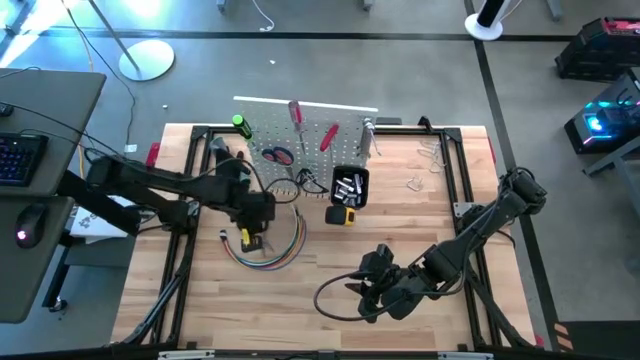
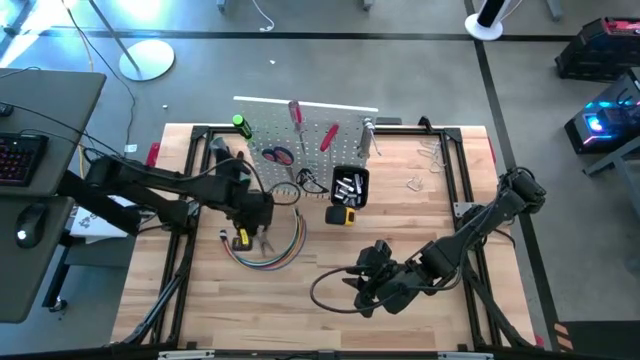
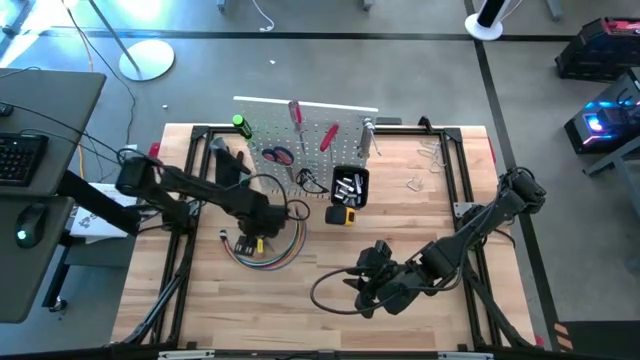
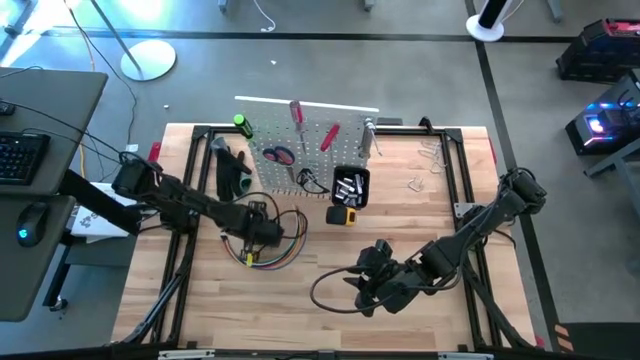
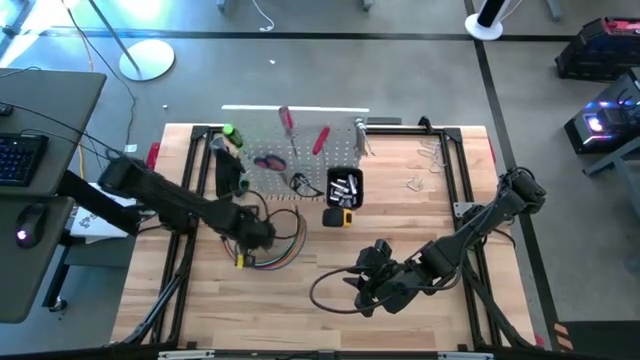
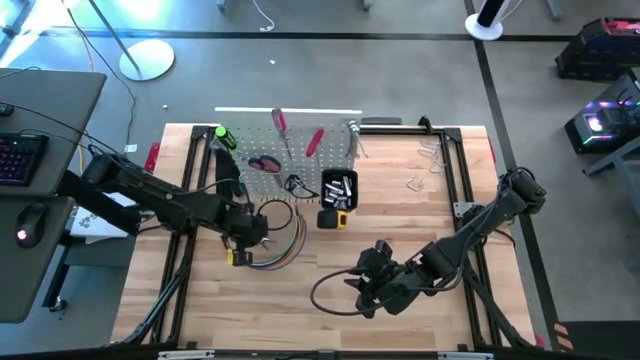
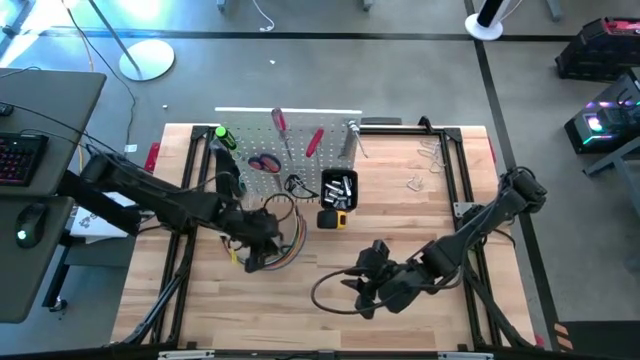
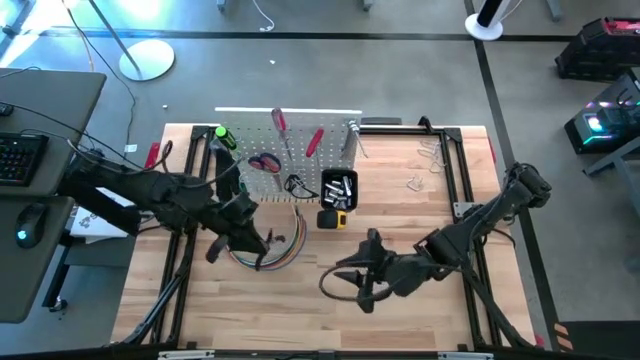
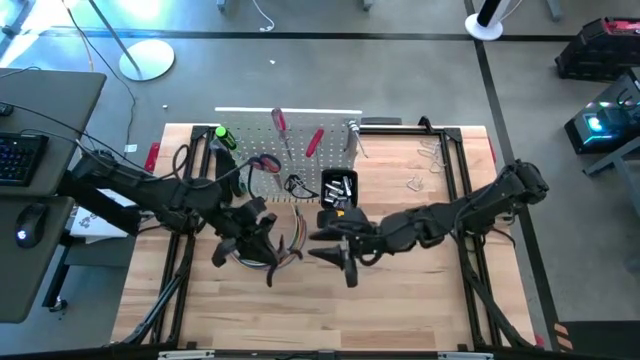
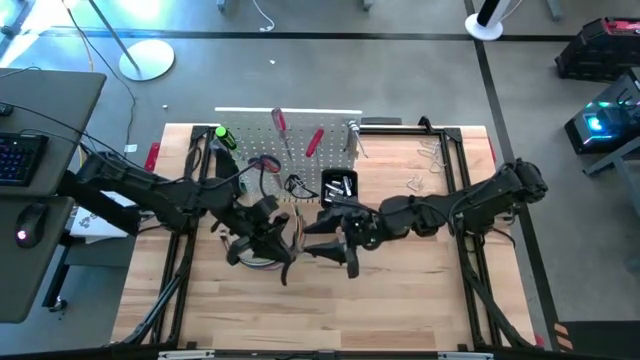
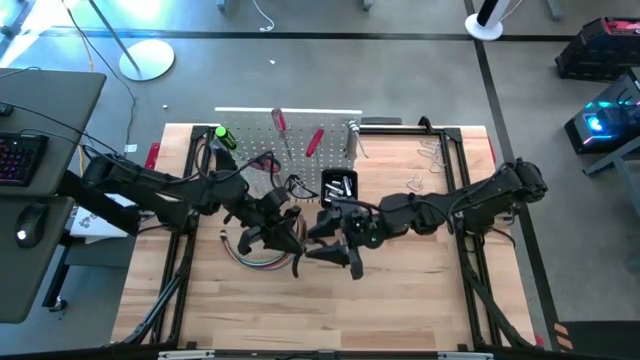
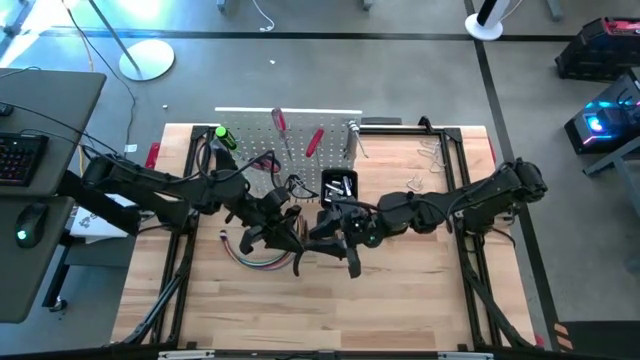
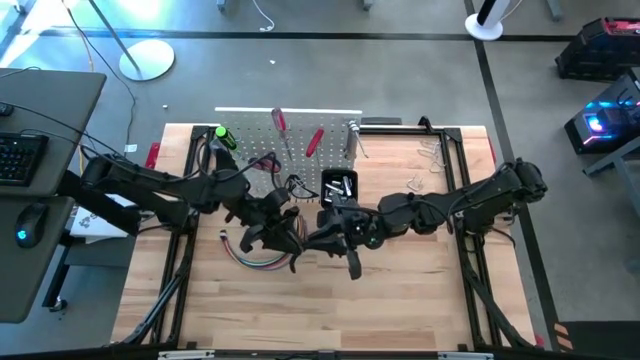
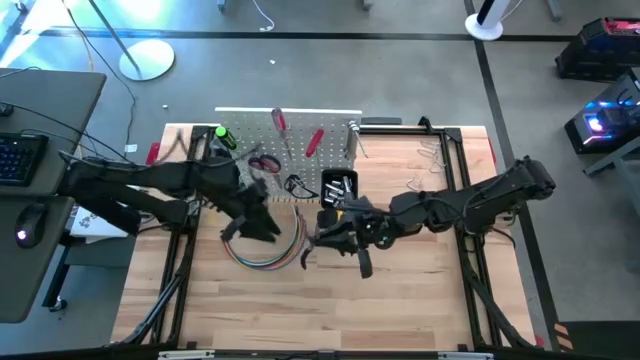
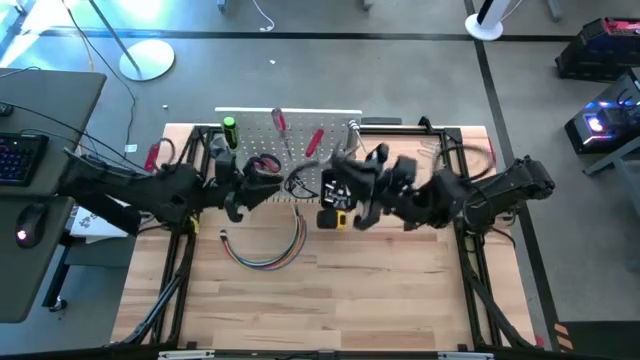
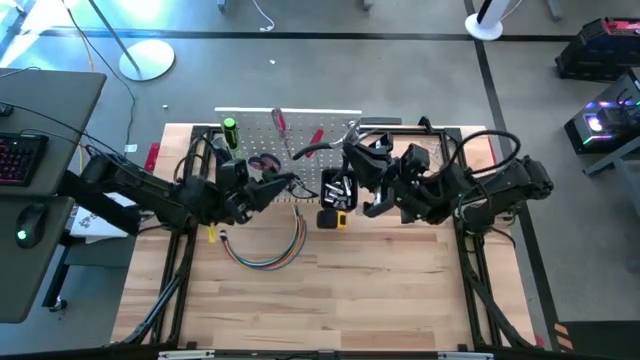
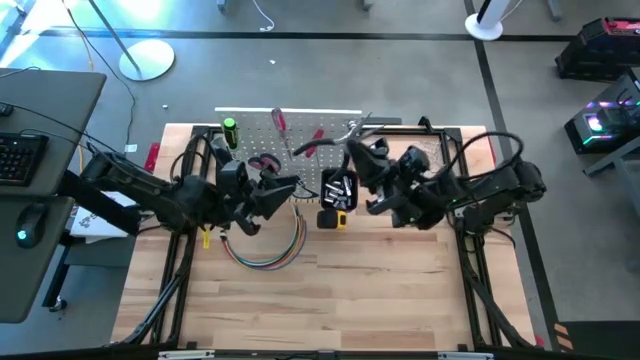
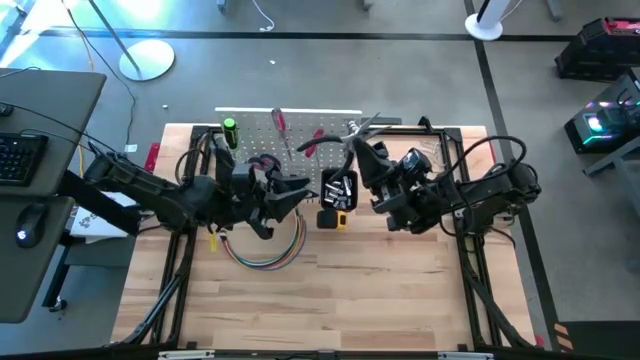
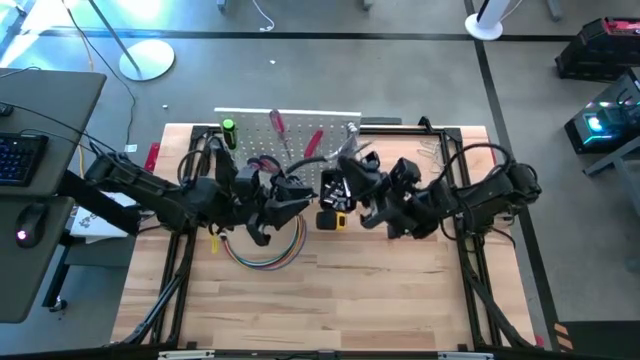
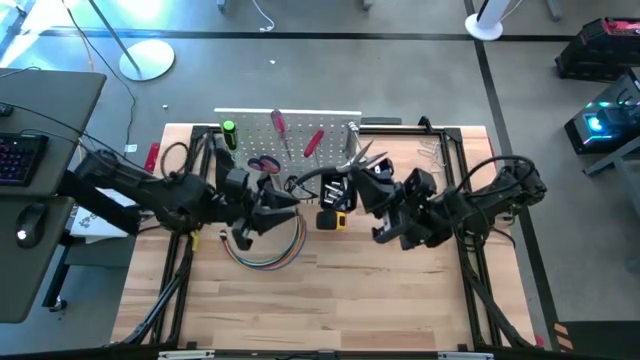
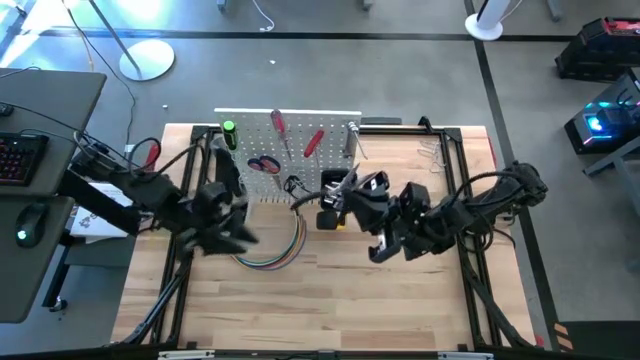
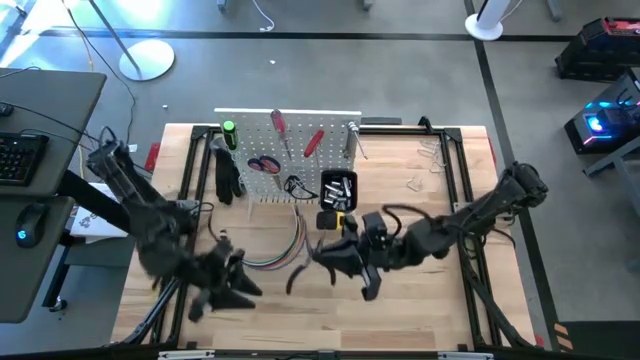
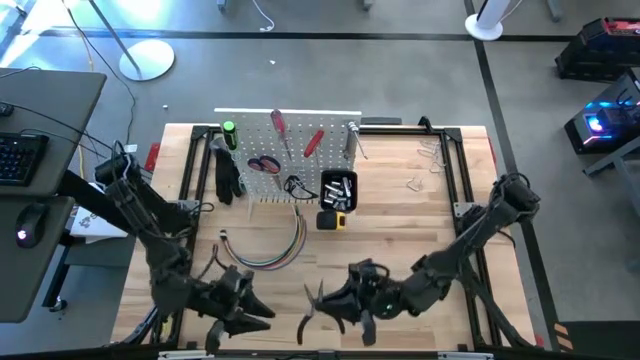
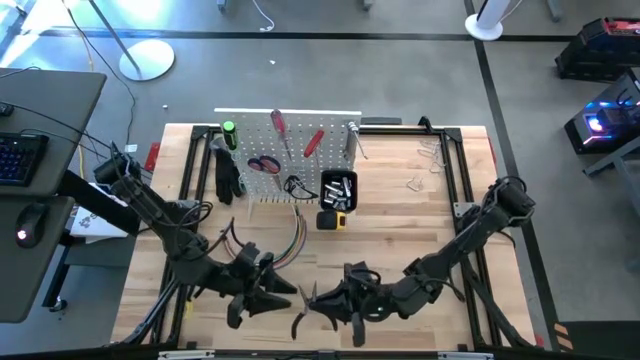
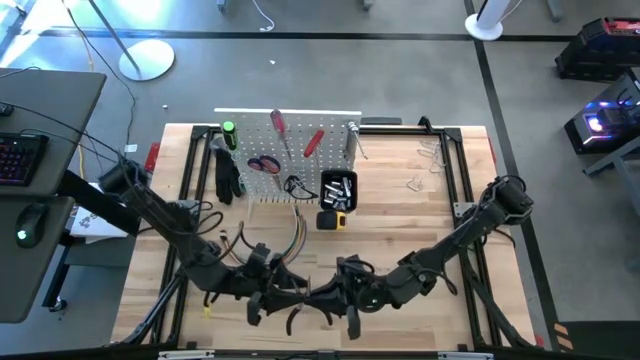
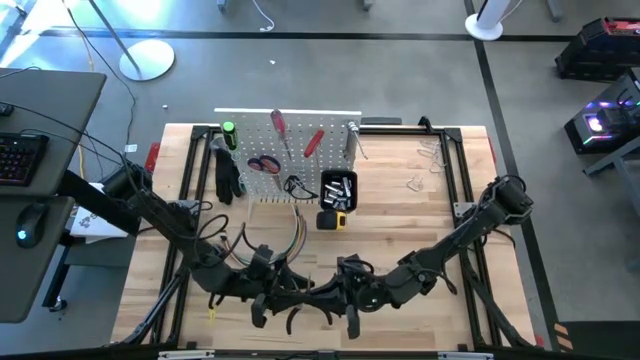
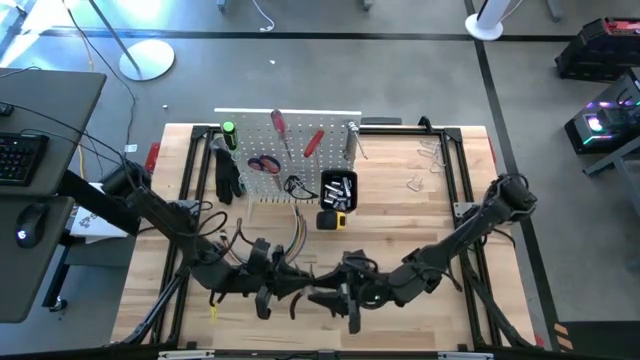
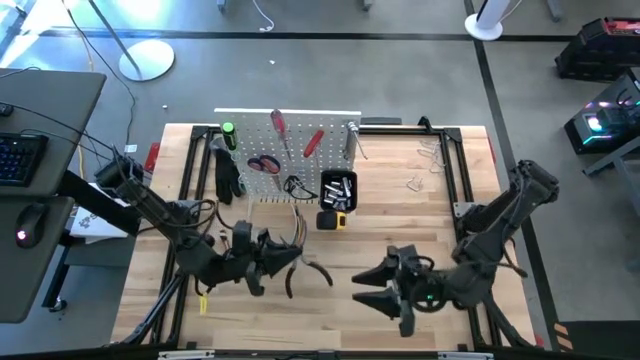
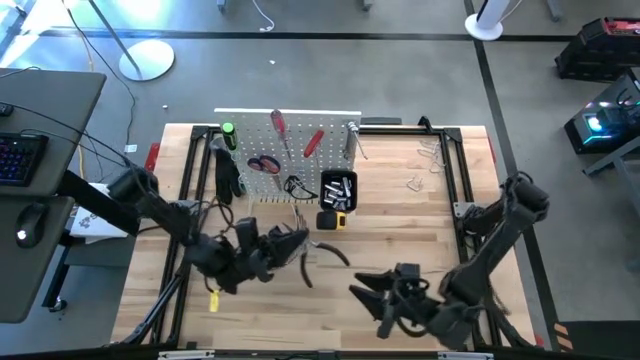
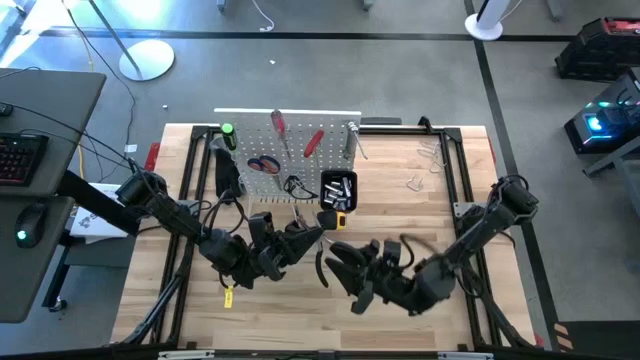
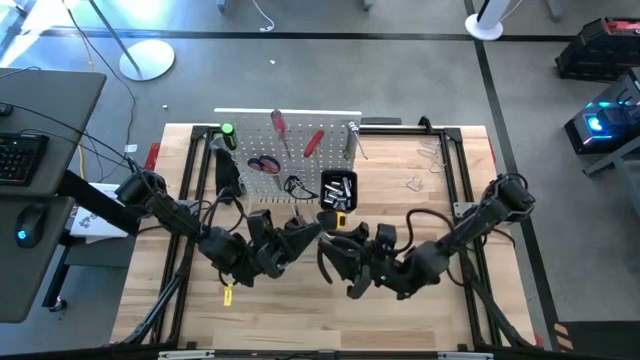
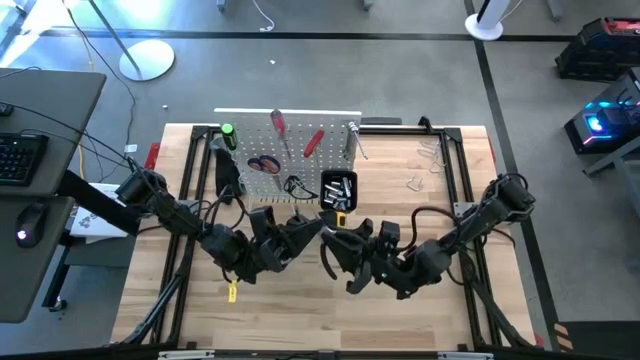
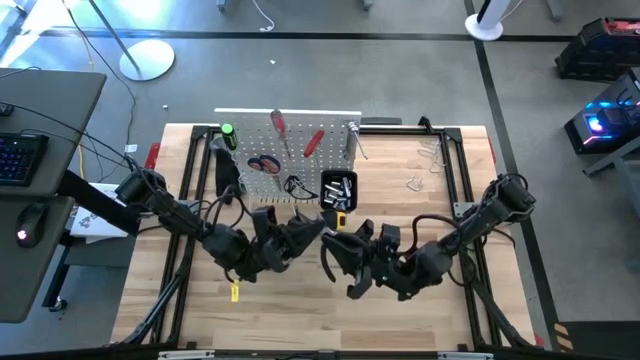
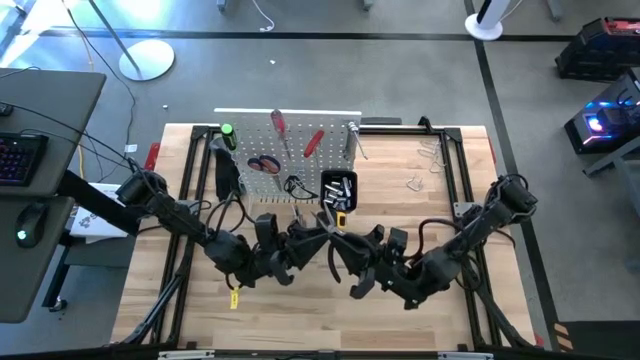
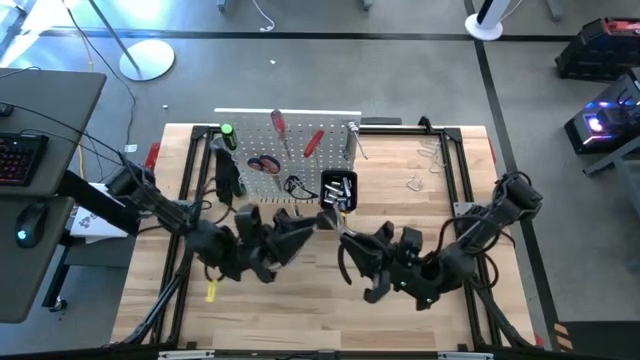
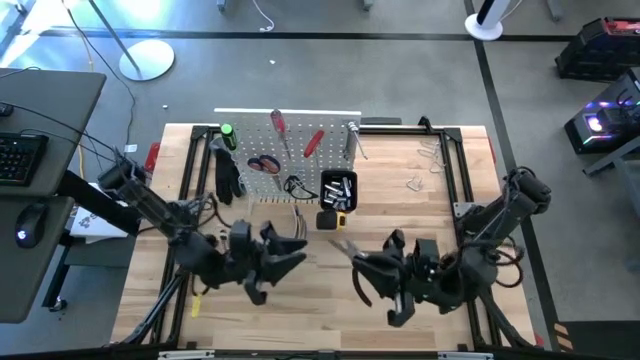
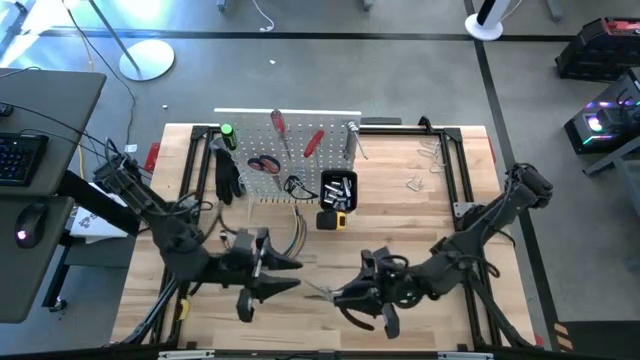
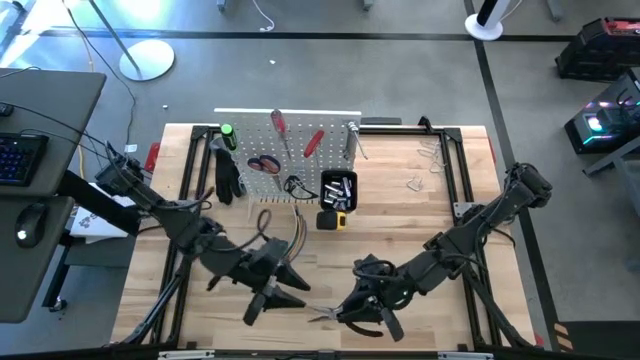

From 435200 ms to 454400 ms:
Task: Hang tools onto peg board
Hang the plier on the peg board
